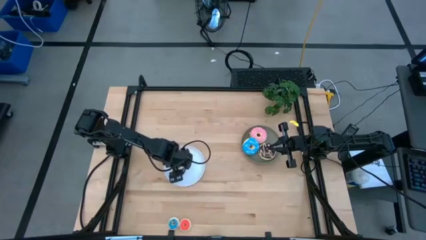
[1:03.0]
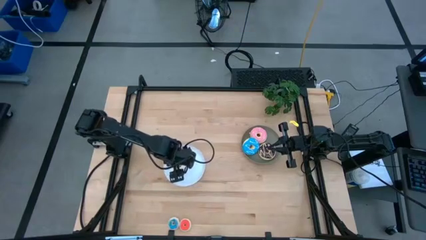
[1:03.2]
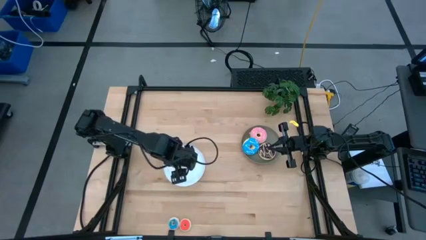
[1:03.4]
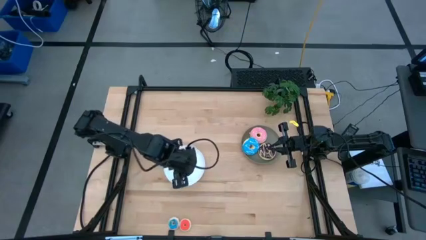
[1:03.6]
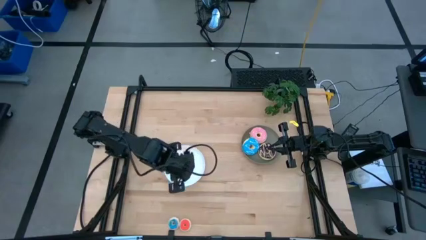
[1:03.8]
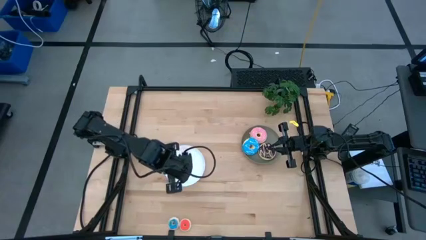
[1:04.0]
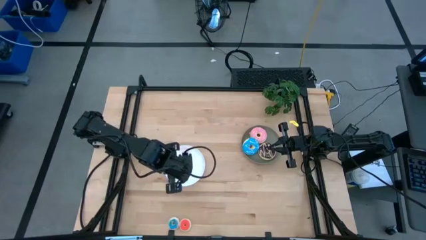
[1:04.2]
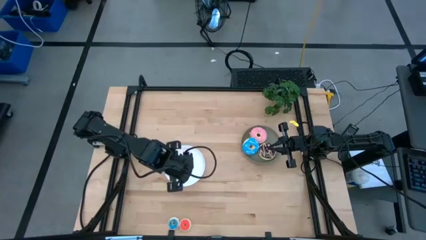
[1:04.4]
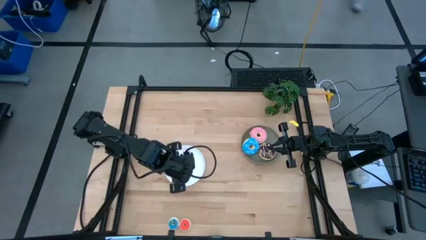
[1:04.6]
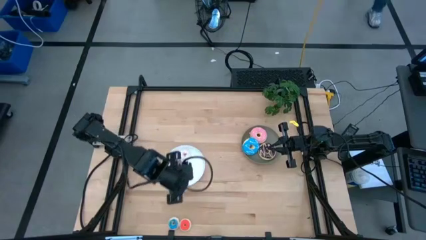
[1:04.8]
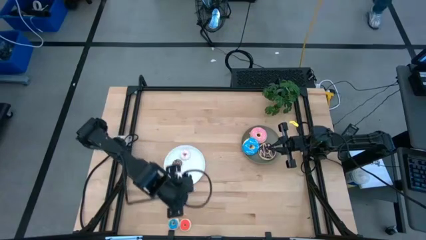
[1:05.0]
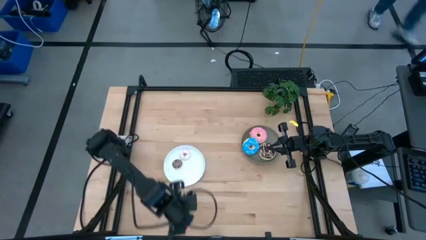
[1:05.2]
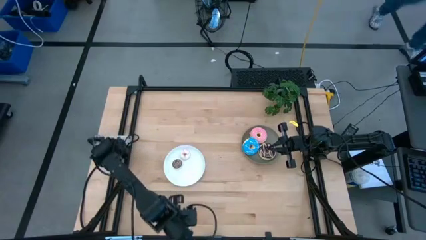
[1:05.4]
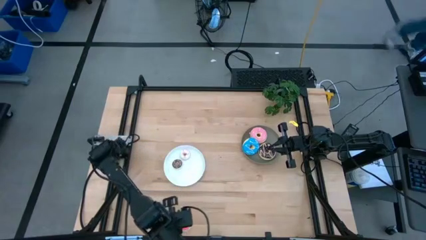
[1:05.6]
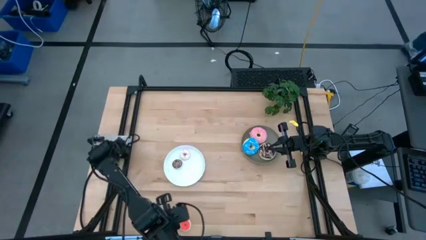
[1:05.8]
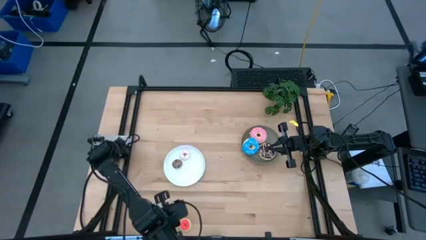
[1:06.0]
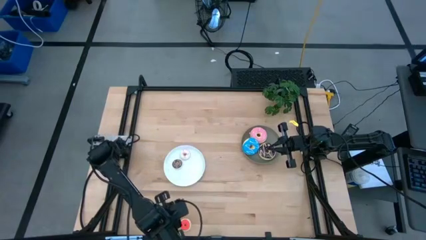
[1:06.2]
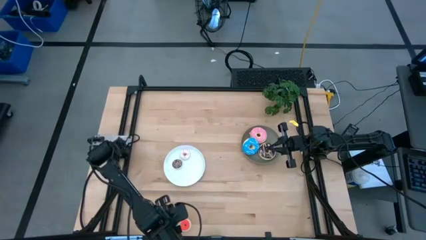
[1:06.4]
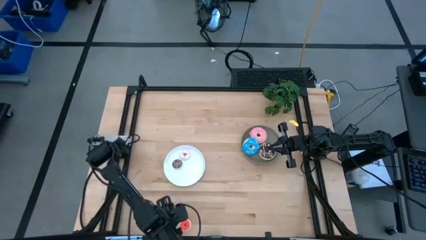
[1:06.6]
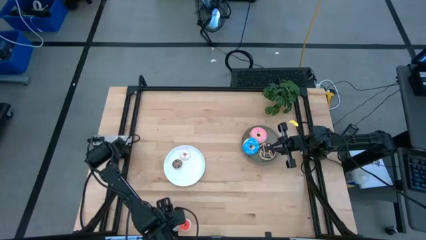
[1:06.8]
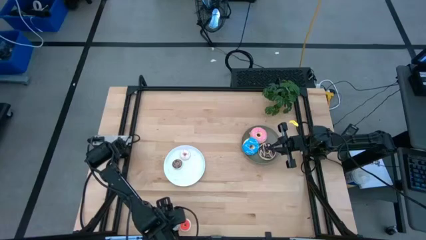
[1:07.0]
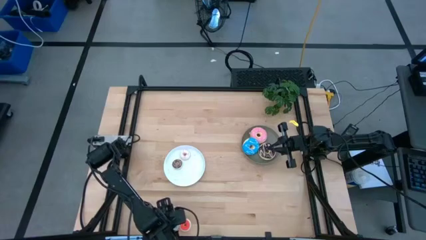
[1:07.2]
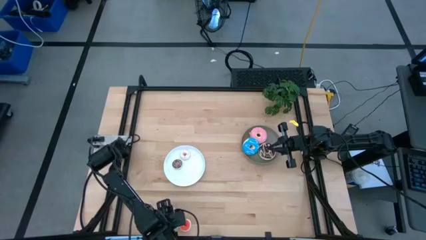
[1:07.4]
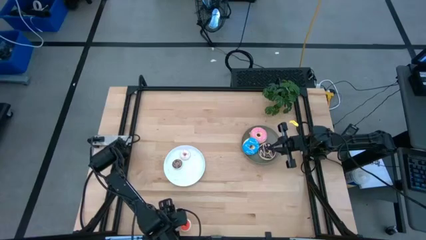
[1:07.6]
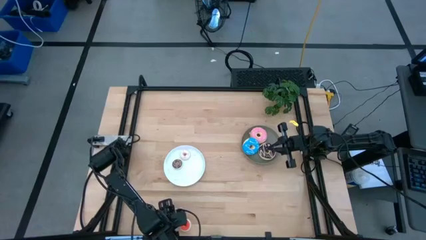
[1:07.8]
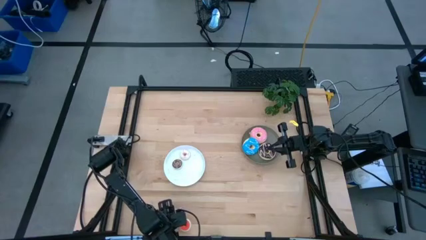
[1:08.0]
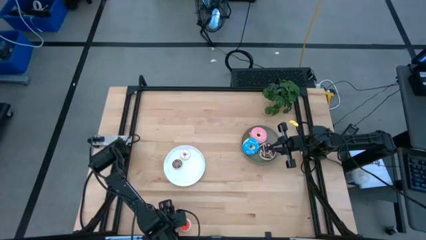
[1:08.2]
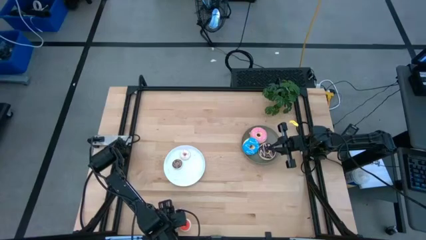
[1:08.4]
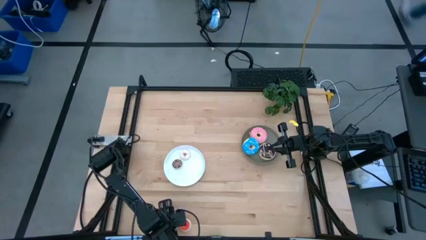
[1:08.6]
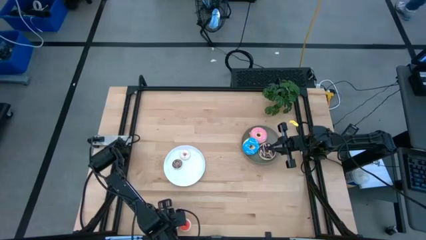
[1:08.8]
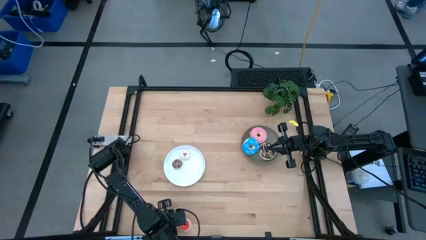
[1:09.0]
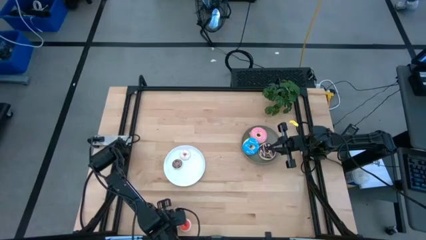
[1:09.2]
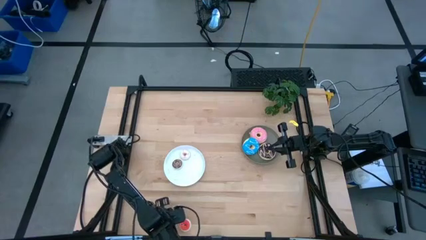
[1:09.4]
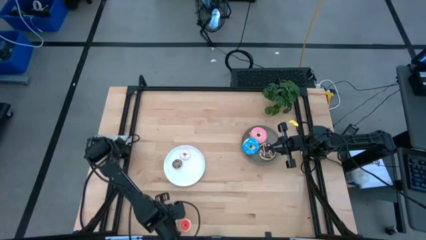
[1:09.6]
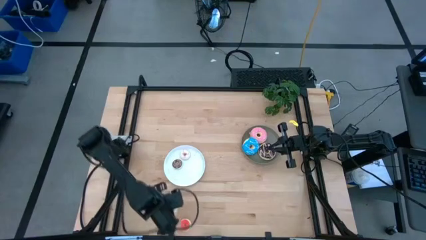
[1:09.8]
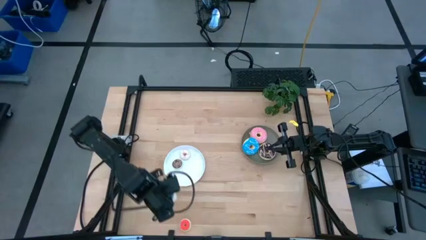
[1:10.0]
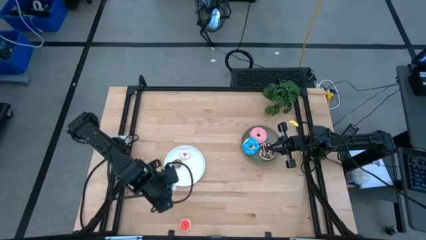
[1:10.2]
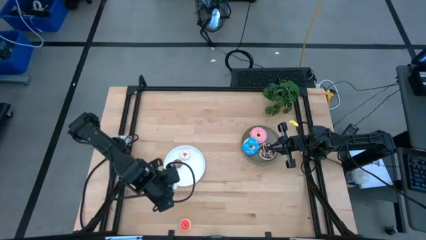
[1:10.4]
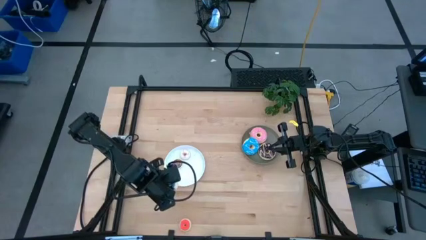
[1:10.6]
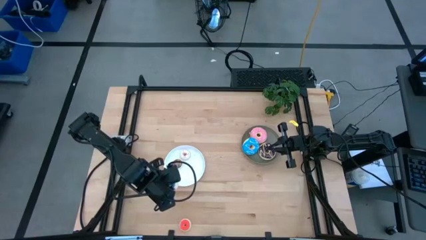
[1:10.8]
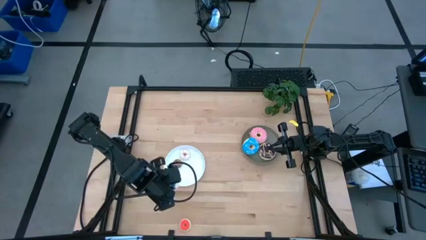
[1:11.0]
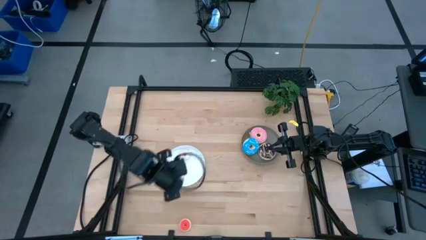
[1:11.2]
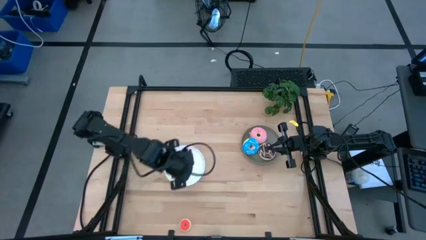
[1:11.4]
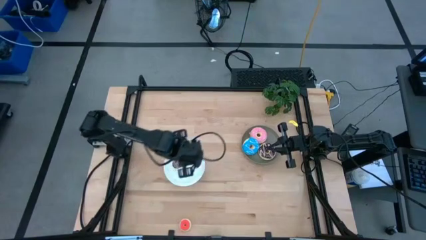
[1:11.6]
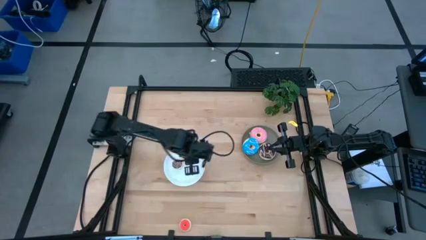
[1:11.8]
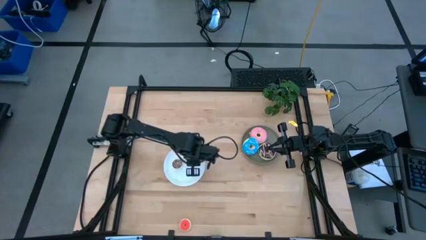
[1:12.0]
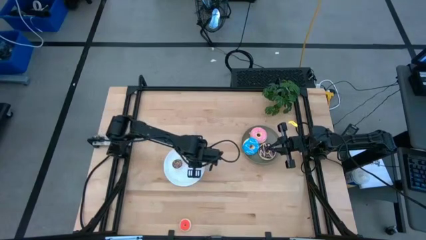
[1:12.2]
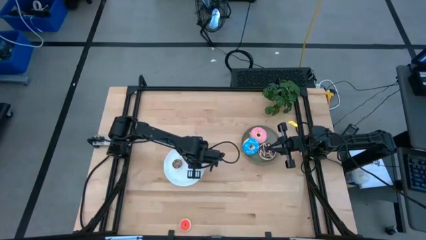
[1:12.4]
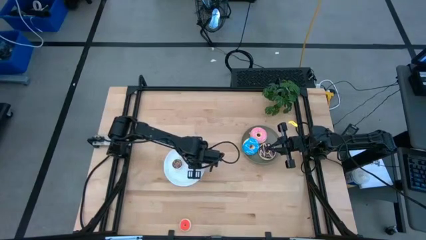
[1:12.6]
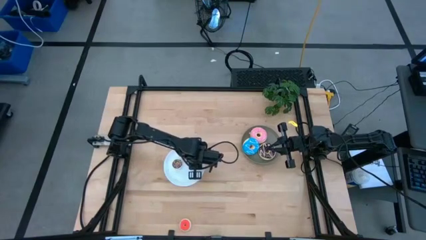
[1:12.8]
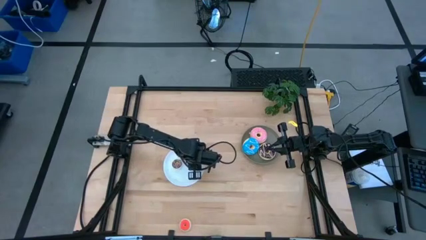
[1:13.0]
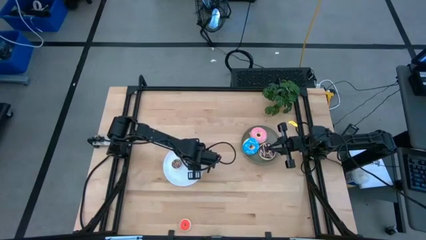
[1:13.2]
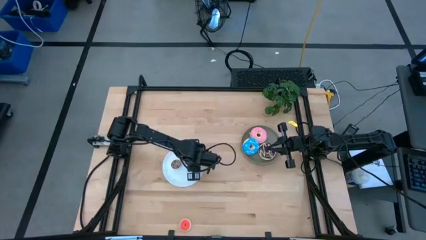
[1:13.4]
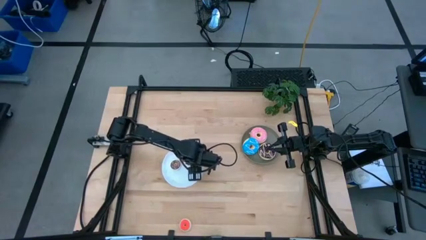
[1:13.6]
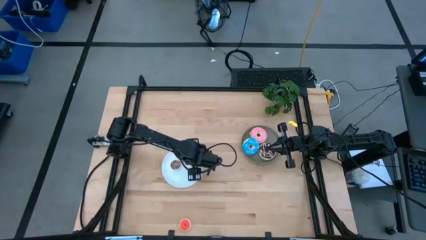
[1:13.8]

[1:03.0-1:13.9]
Task: Pick & Place donuts
Put the small blue donut on the white plate

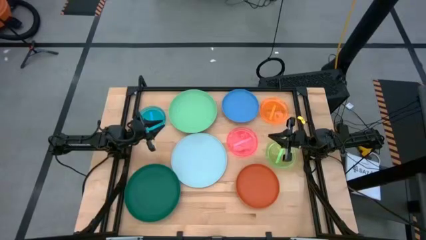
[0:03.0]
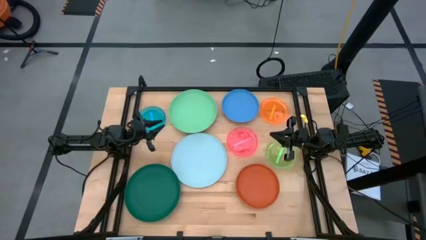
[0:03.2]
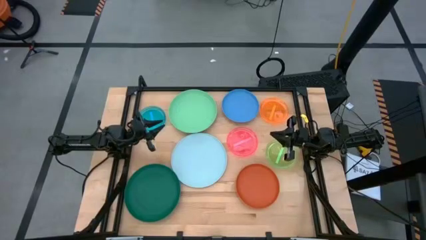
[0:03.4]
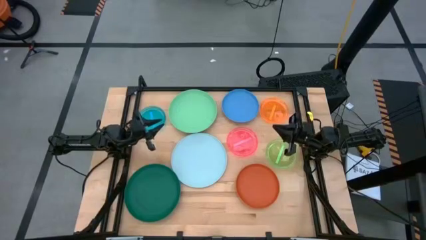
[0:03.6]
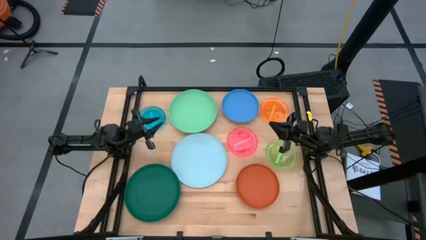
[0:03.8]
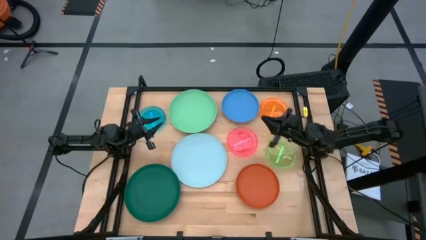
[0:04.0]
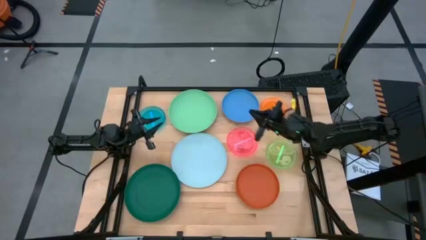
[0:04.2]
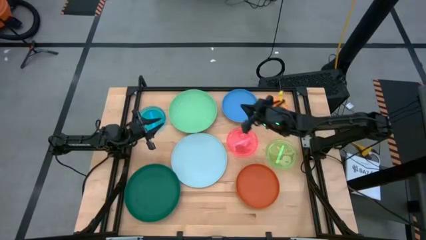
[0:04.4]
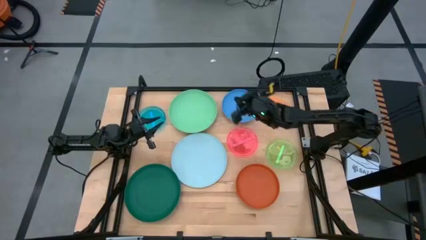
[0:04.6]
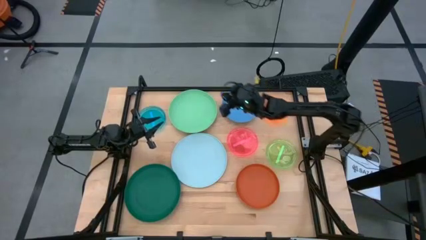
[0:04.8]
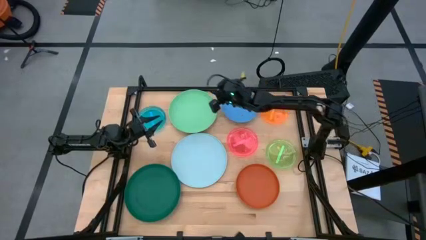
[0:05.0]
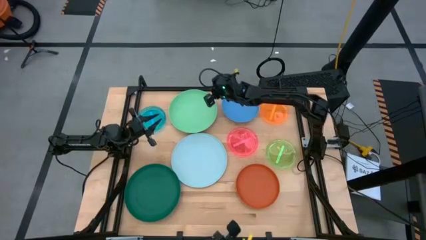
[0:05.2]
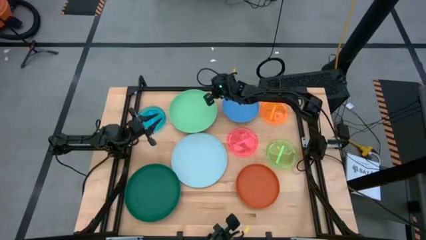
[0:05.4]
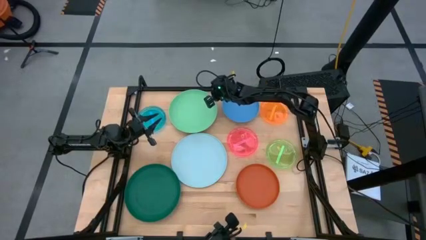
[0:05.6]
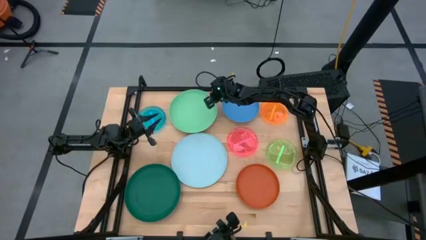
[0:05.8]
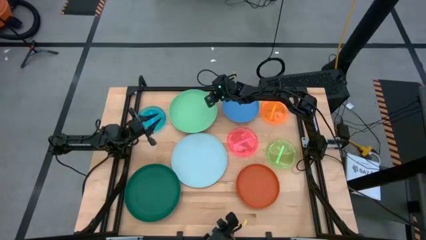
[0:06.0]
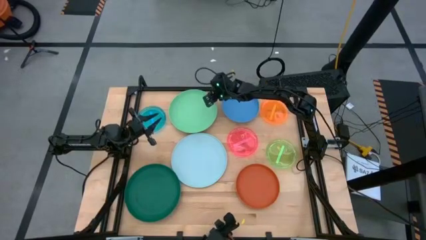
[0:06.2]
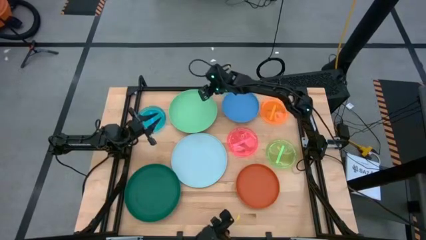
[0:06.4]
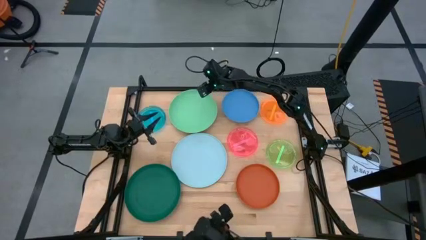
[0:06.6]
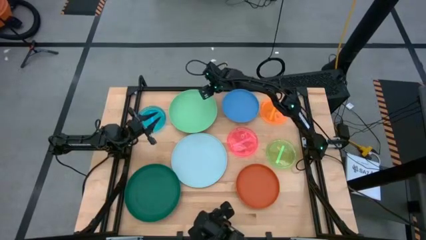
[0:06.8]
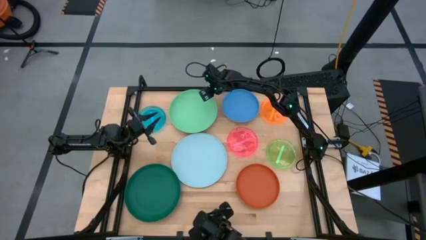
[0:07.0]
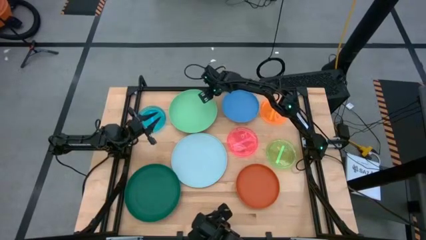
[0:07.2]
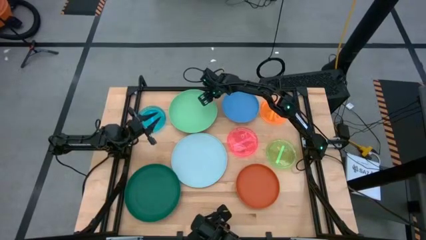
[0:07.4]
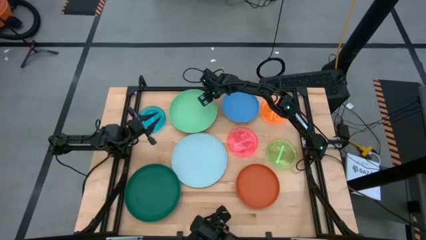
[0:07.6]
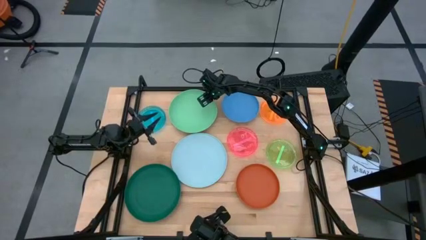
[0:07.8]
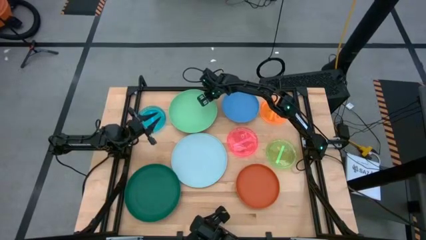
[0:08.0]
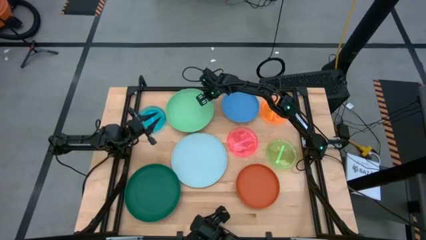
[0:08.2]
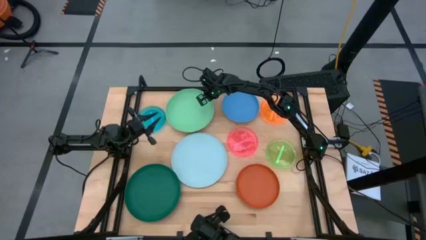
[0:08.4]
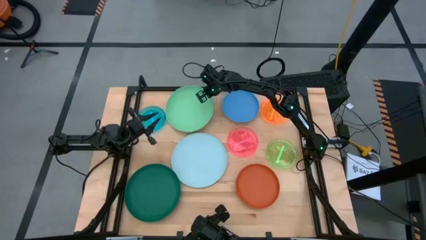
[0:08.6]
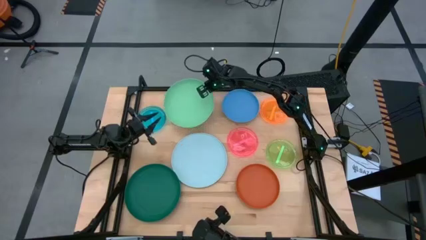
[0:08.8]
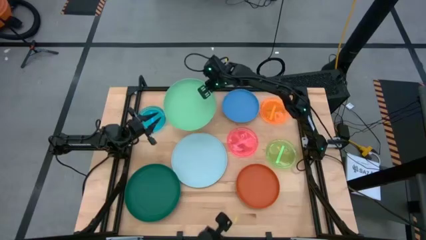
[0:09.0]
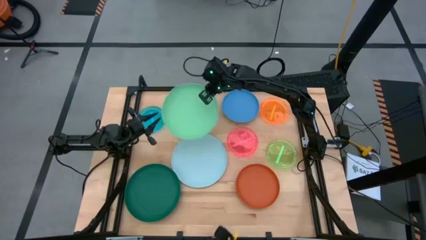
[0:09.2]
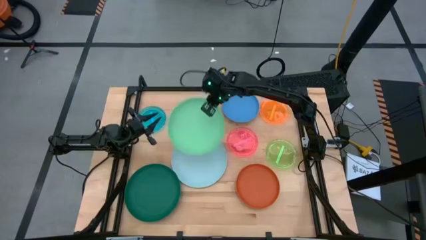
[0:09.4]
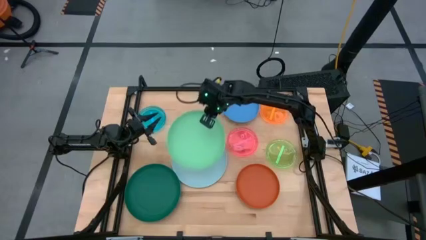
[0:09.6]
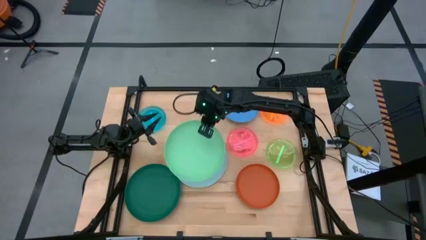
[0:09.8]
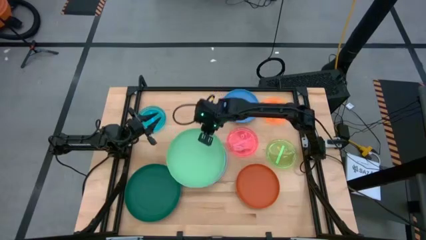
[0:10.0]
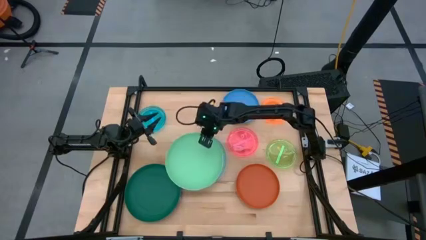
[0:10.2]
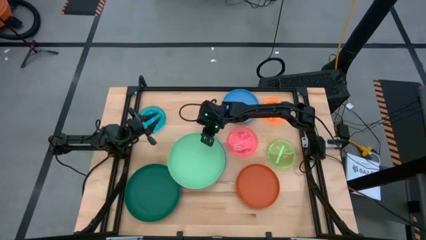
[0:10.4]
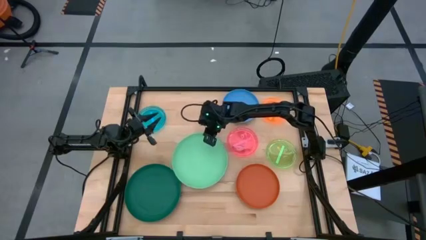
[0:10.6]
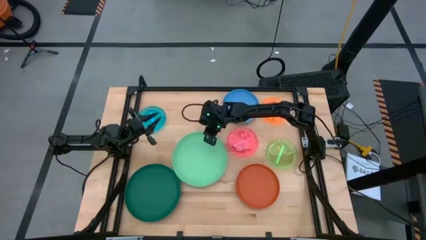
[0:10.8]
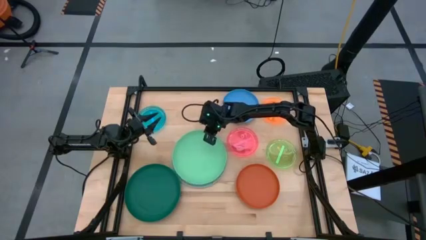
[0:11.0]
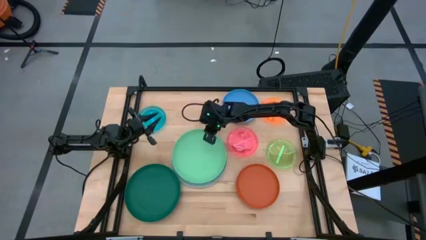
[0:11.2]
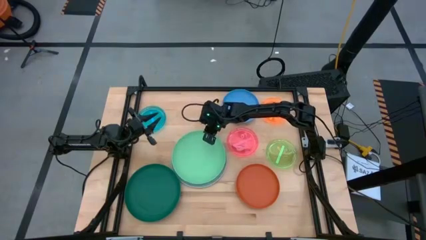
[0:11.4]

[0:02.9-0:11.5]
Task: Stack plastic plates
Stack the green plate on top of the light blue plate
